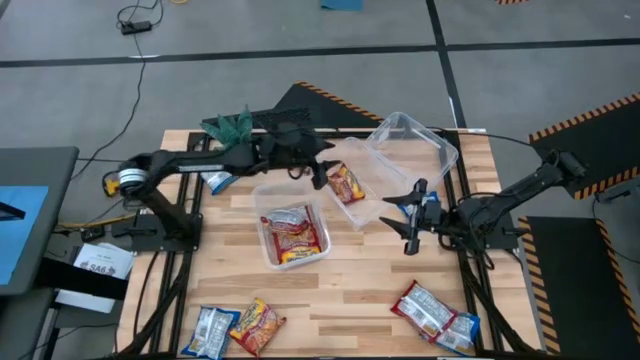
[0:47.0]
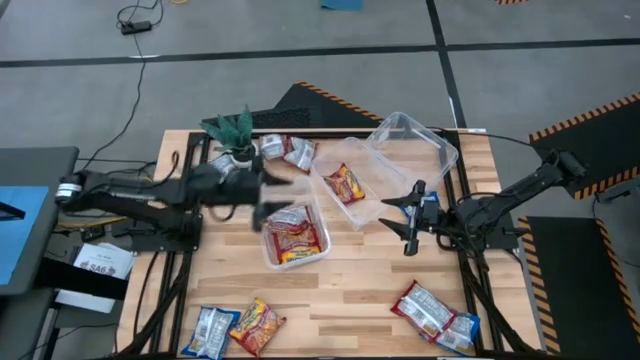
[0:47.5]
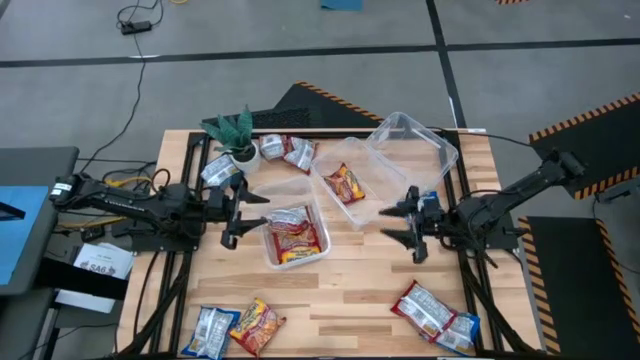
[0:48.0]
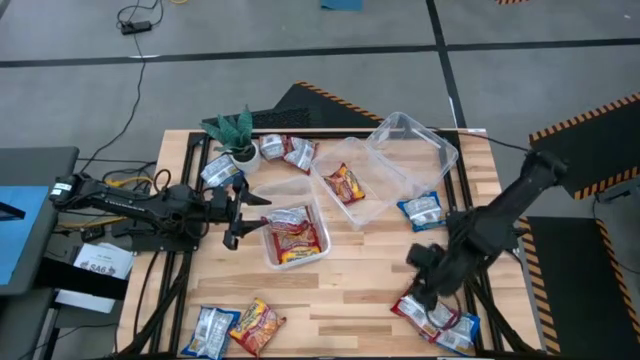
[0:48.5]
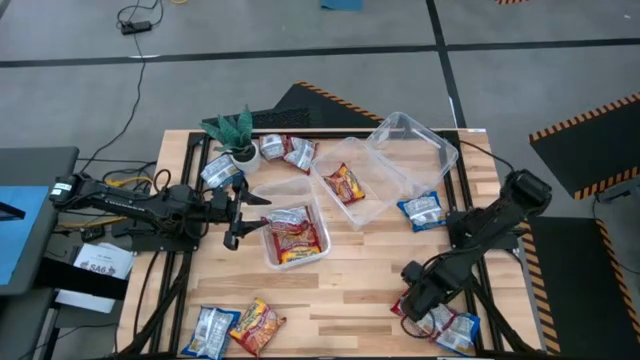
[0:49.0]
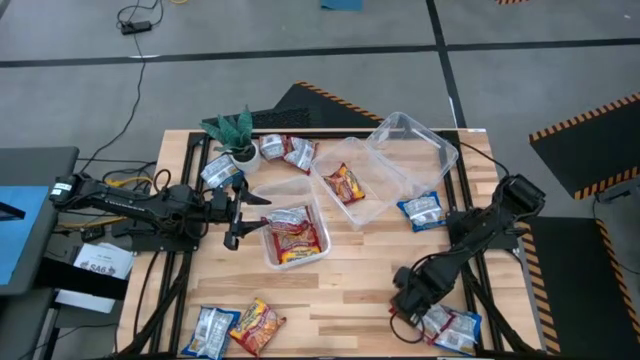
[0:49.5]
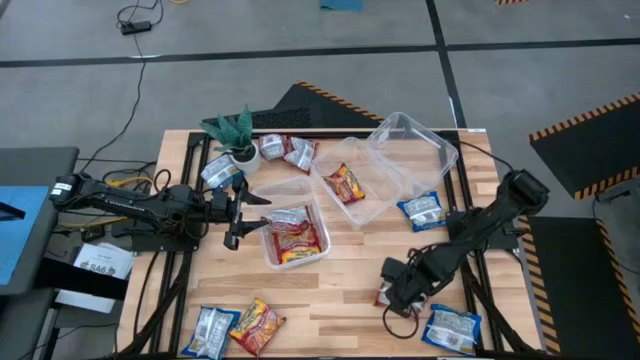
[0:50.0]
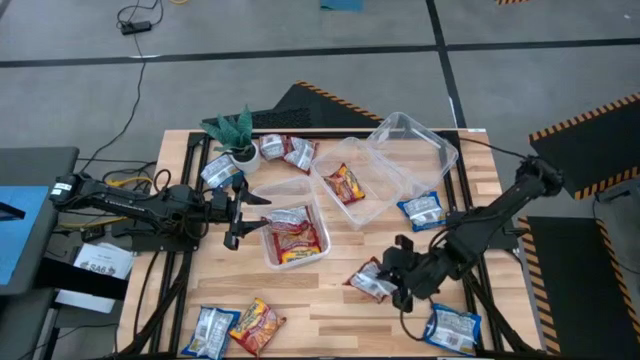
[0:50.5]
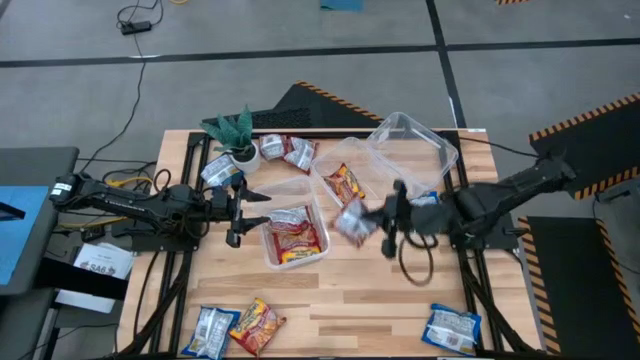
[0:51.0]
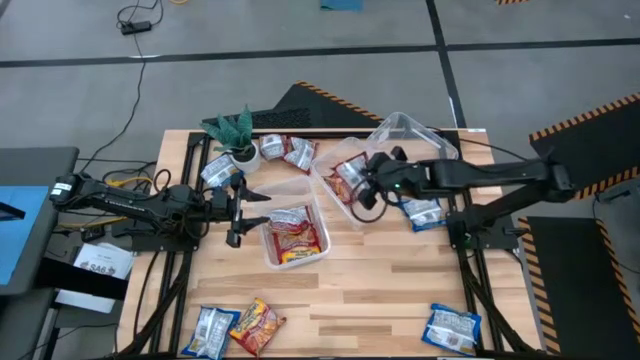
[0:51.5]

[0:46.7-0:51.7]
Task: Sort Maruchan noodles
Put the red noodle pack into the middle bin

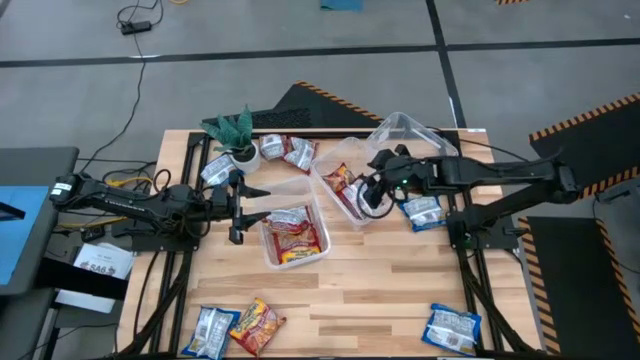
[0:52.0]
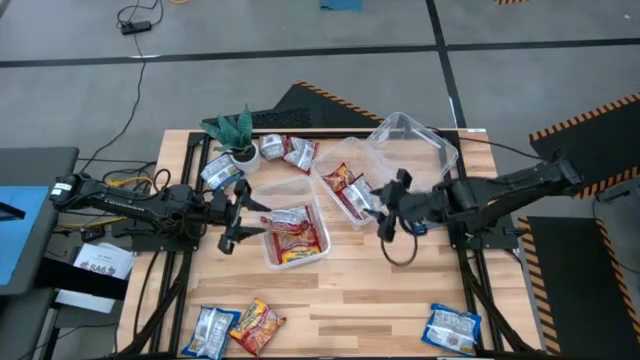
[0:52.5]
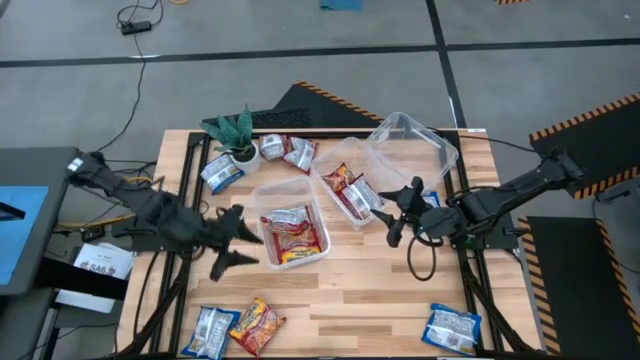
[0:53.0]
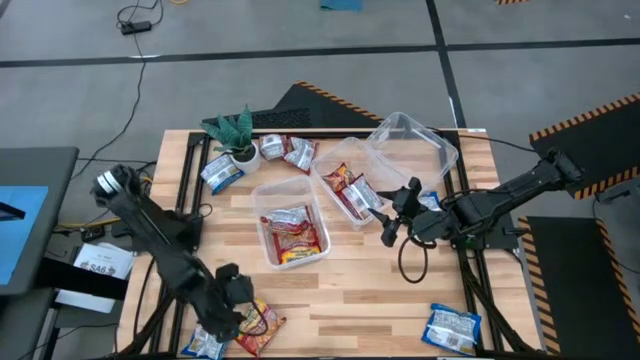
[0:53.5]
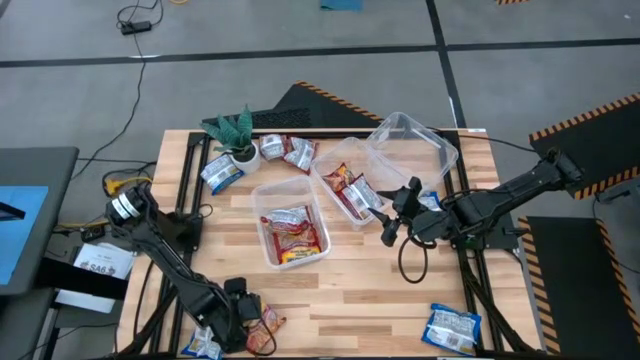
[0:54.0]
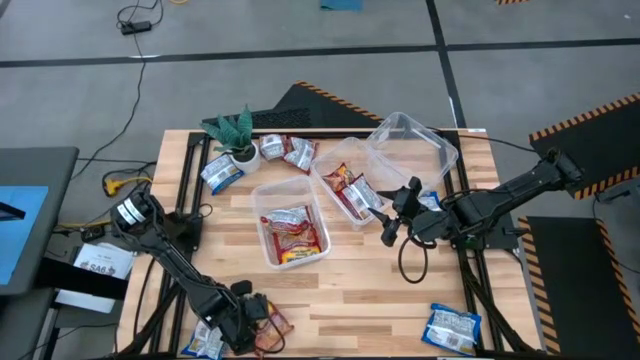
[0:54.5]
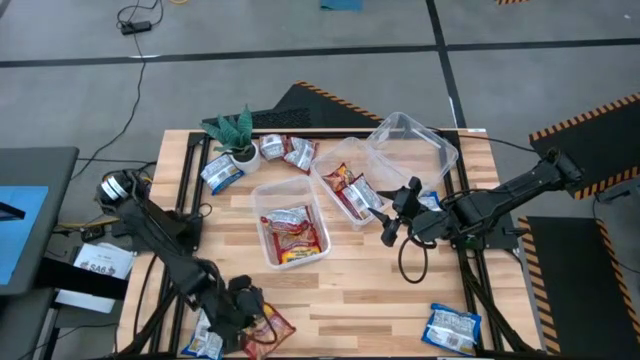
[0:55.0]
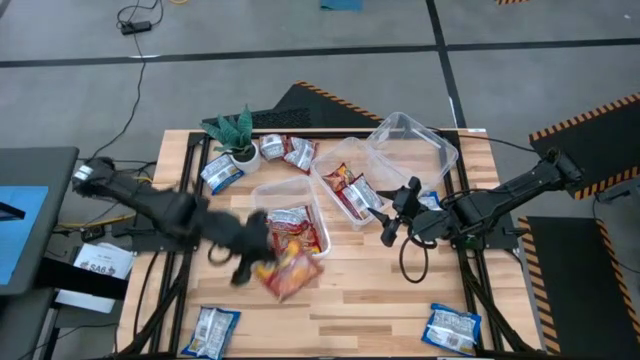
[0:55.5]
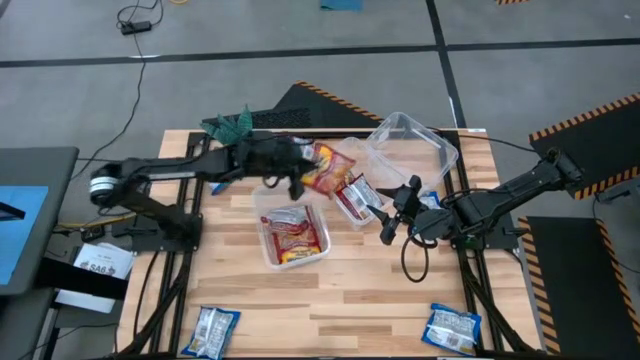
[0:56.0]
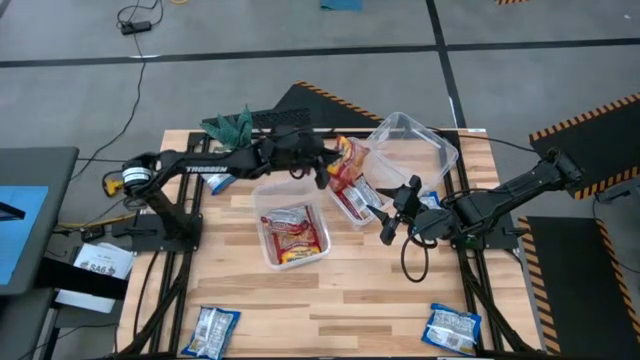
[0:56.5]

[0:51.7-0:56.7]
Put the red noodle pack into the middle bin

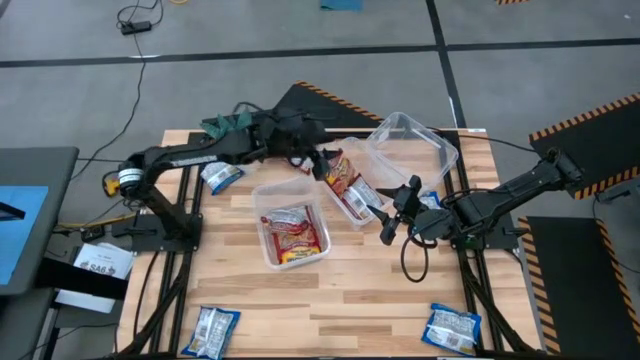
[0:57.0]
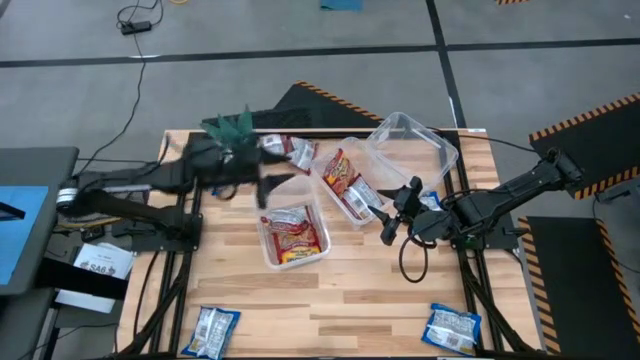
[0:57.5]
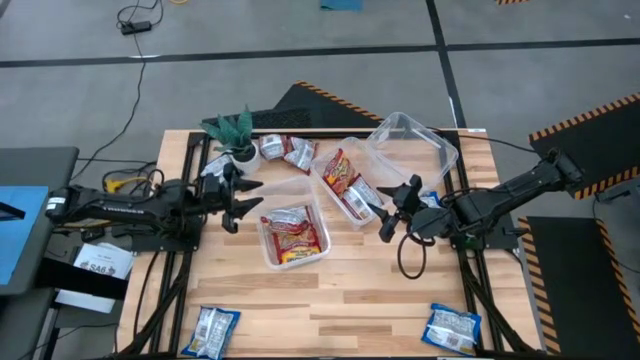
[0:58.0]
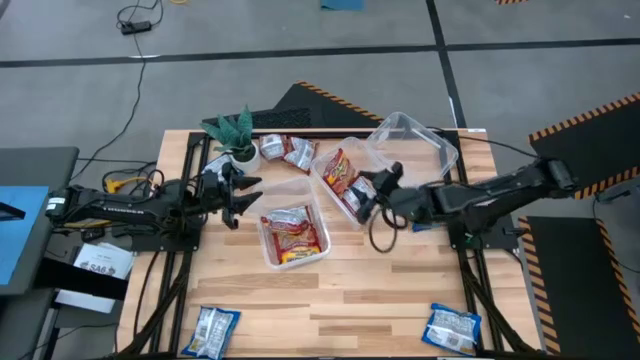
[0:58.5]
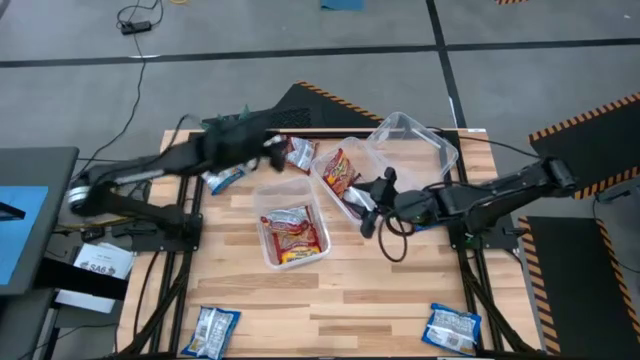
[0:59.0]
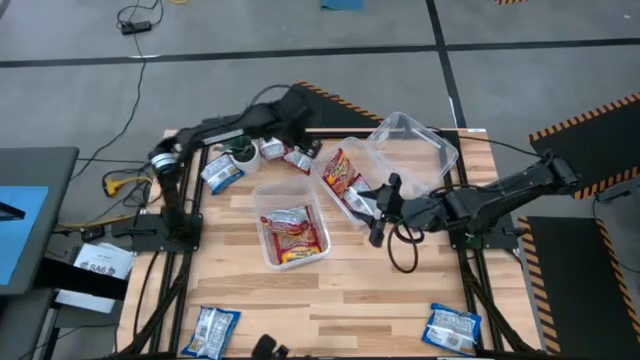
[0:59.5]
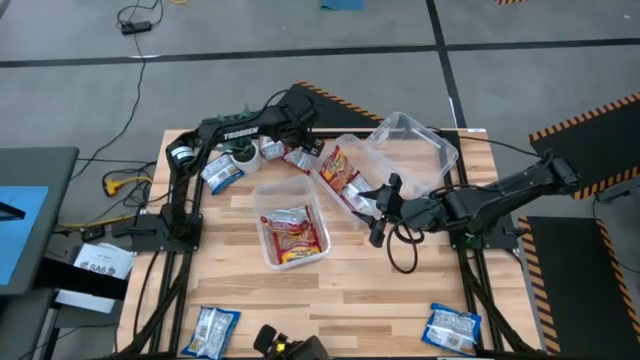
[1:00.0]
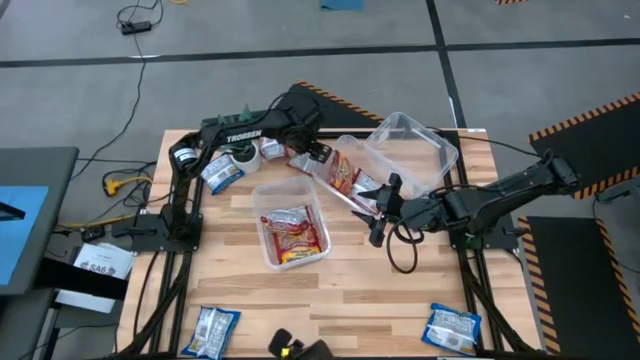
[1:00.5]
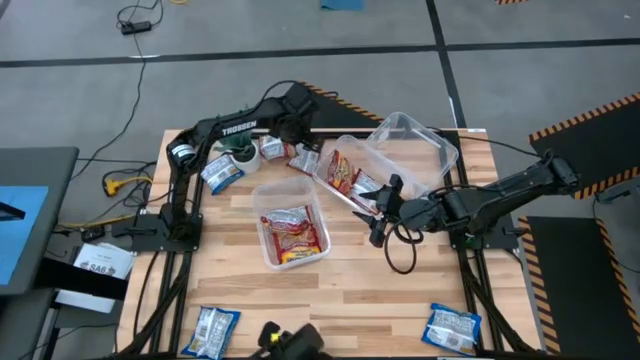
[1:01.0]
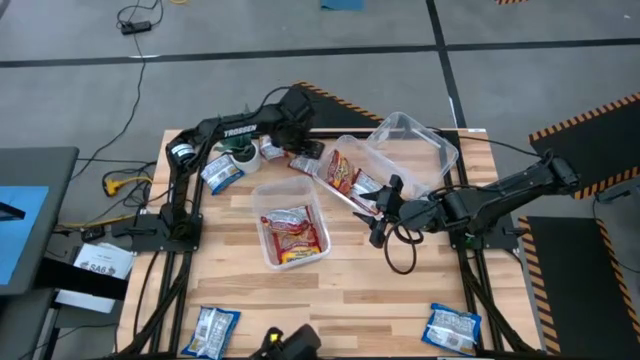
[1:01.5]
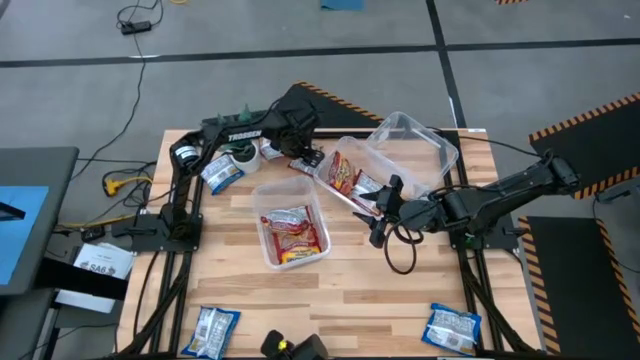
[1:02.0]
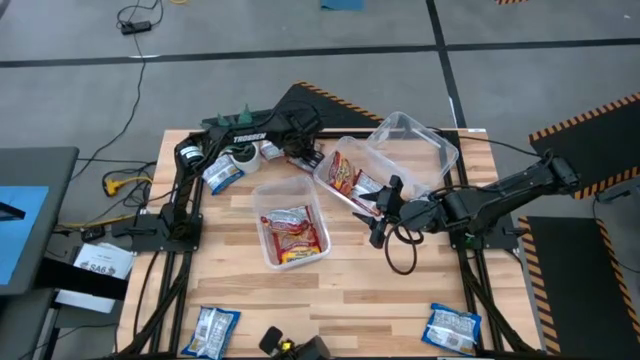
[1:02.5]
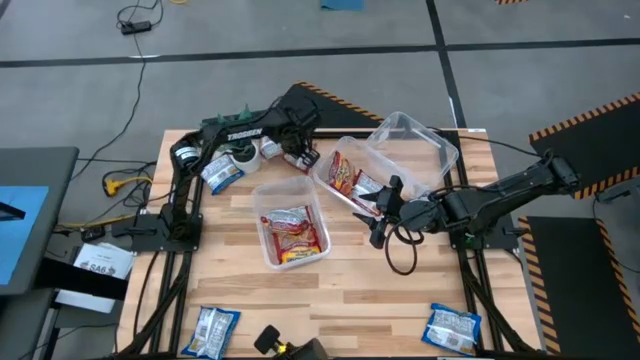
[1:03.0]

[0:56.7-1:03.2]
Put the red noodle pack into the middle bin

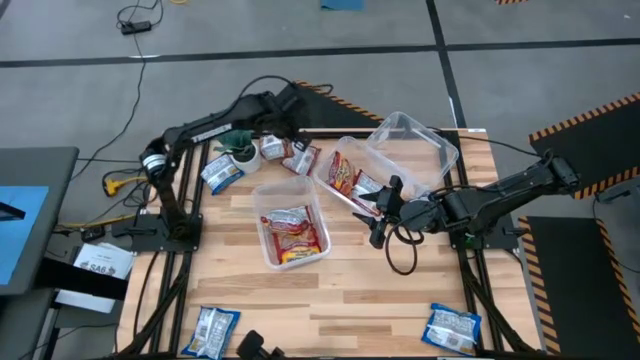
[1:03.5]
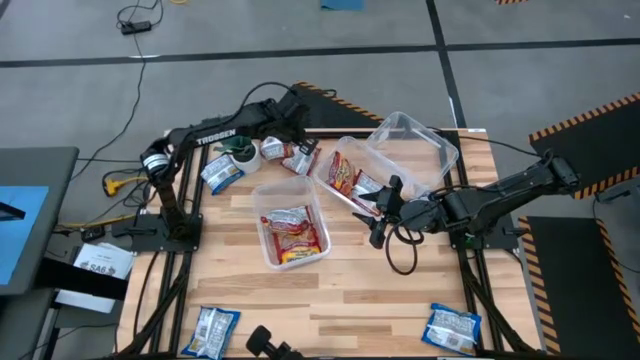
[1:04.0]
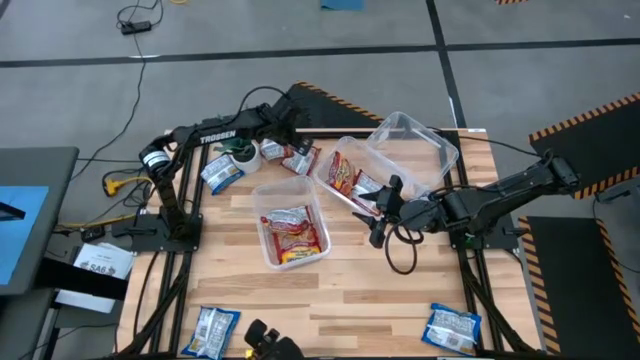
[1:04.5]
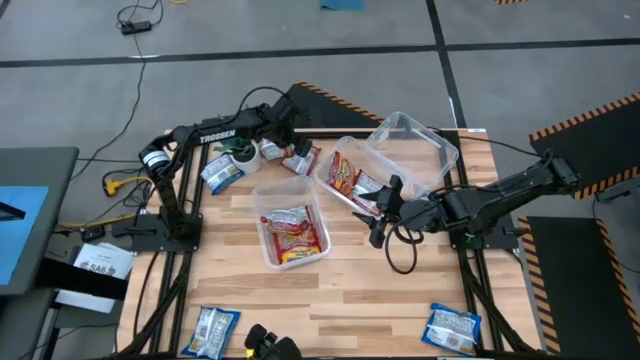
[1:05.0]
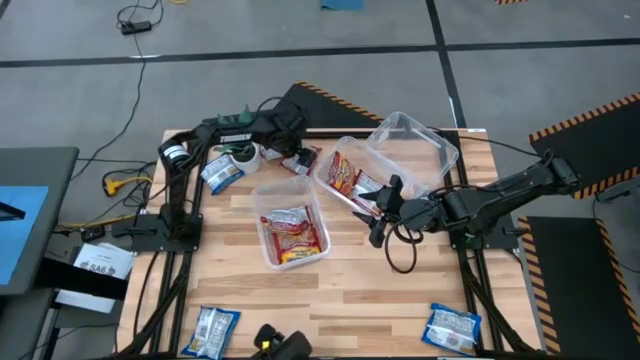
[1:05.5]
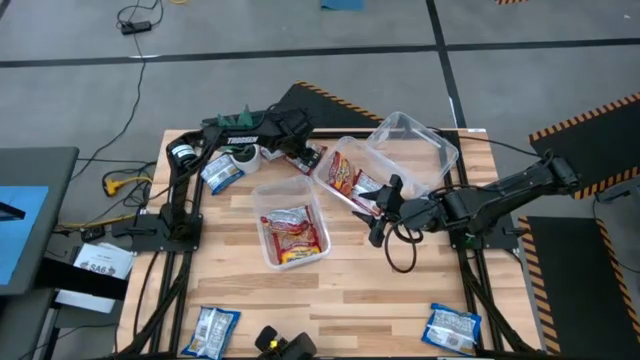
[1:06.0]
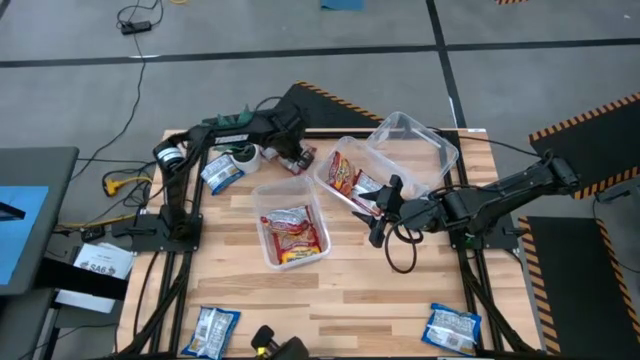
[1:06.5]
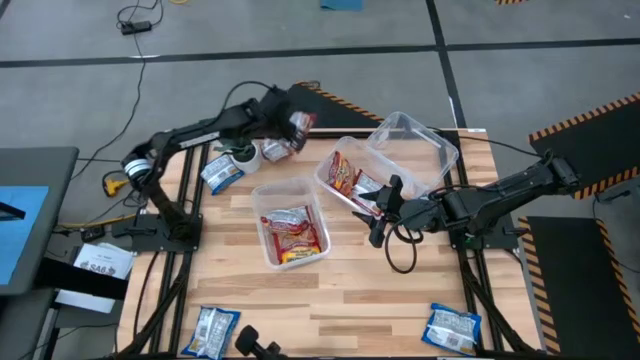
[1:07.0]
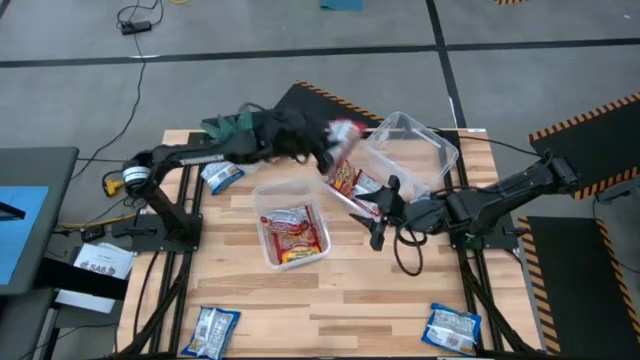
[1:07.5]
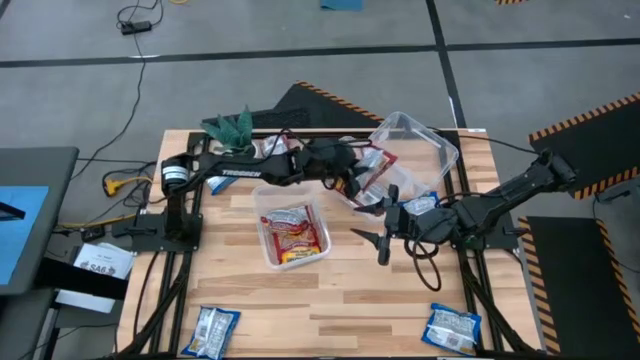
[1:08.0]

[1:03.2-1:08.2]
Put the red noodle pack into the middle bin
